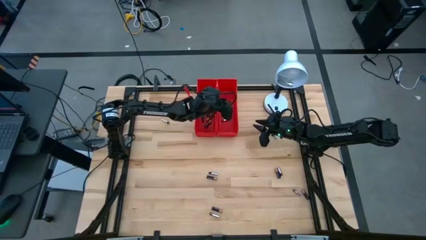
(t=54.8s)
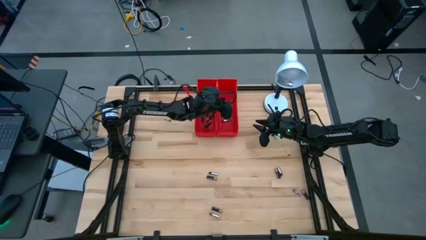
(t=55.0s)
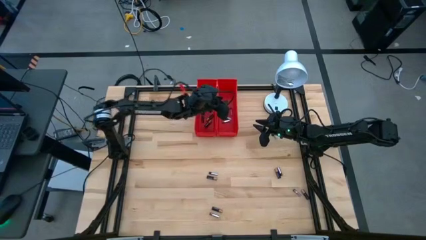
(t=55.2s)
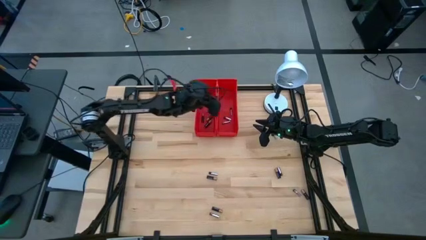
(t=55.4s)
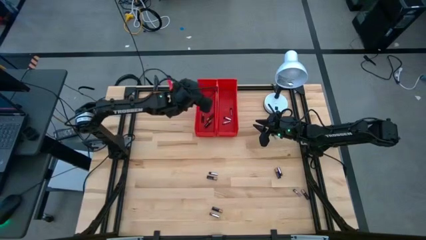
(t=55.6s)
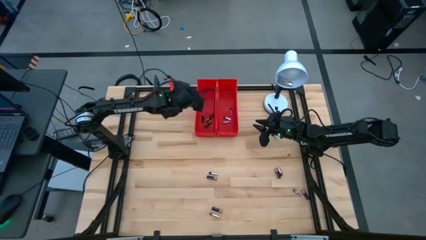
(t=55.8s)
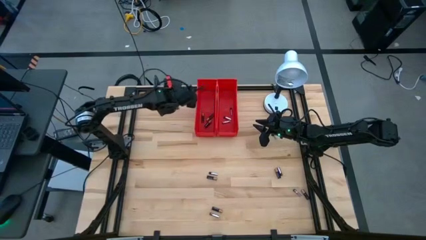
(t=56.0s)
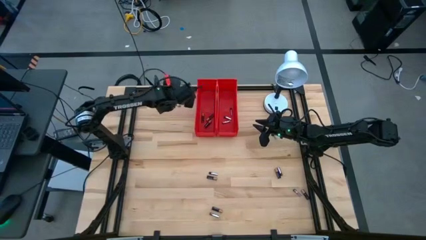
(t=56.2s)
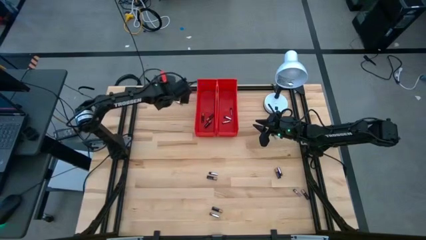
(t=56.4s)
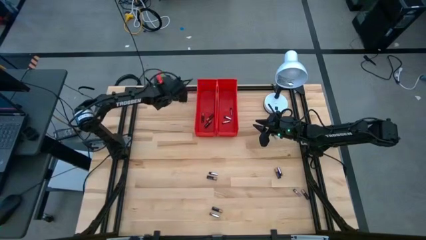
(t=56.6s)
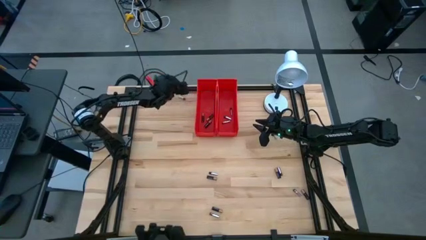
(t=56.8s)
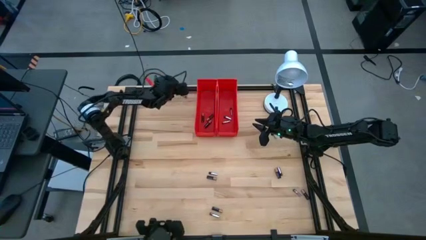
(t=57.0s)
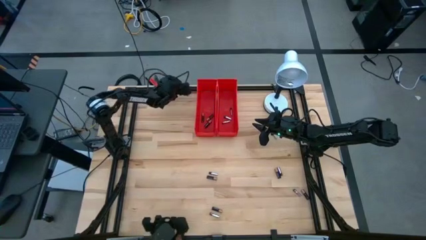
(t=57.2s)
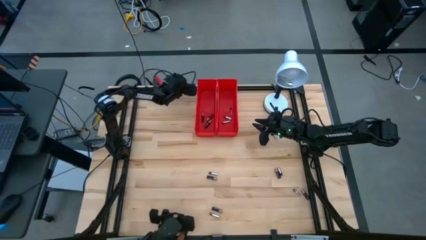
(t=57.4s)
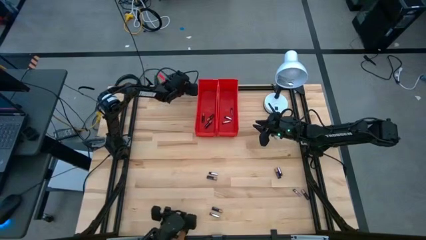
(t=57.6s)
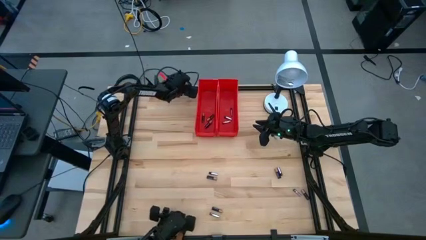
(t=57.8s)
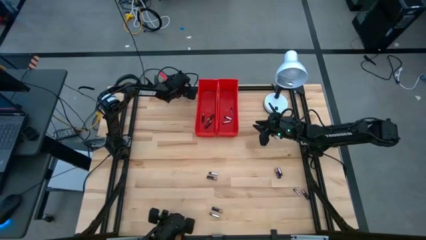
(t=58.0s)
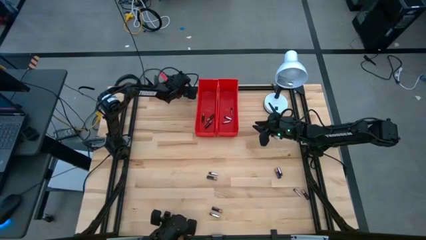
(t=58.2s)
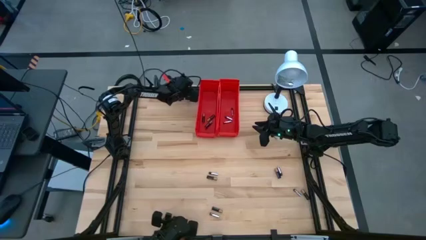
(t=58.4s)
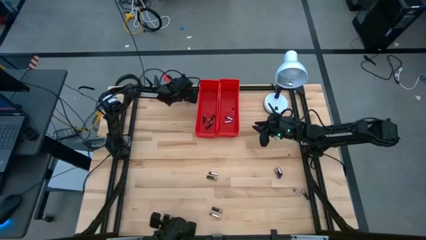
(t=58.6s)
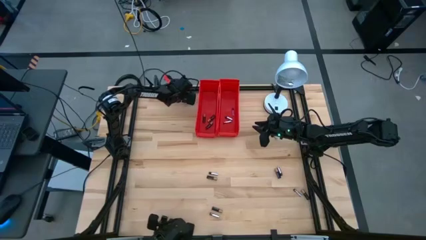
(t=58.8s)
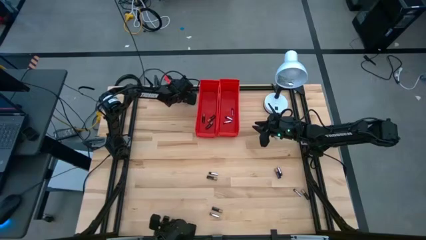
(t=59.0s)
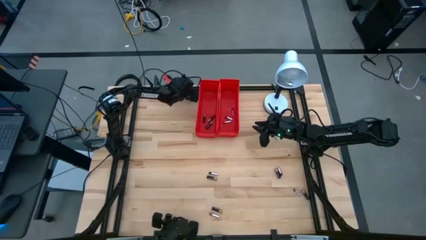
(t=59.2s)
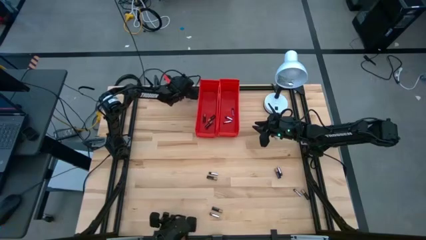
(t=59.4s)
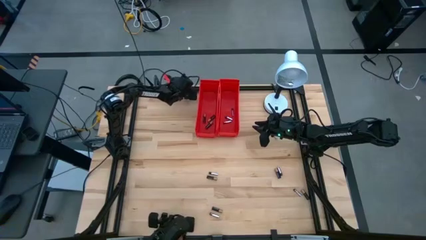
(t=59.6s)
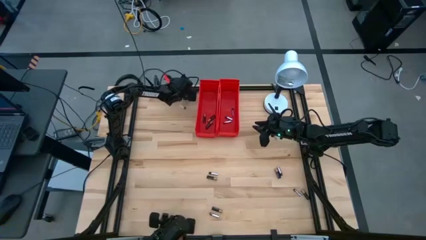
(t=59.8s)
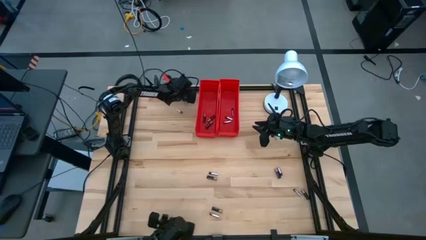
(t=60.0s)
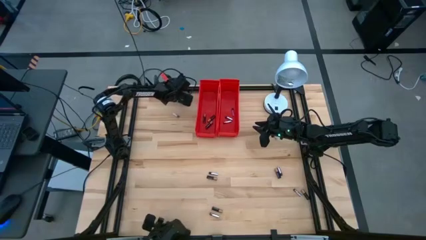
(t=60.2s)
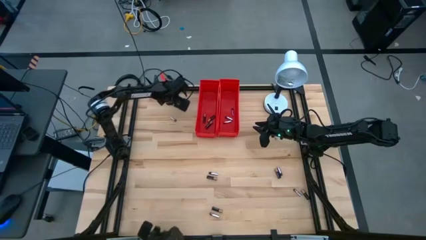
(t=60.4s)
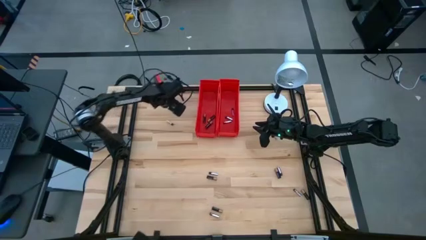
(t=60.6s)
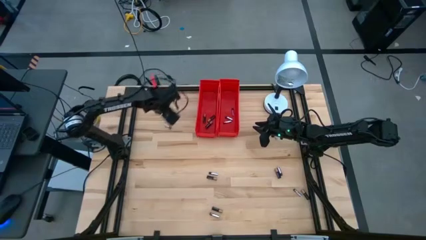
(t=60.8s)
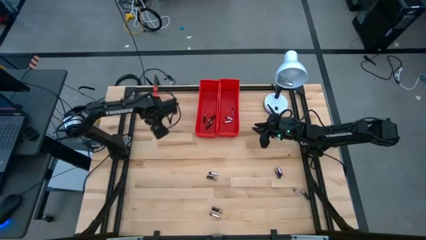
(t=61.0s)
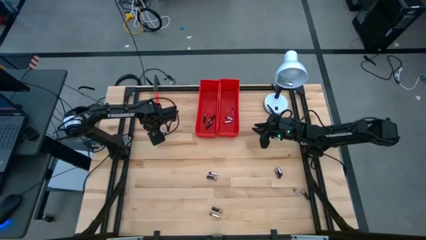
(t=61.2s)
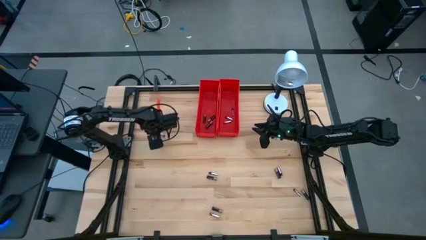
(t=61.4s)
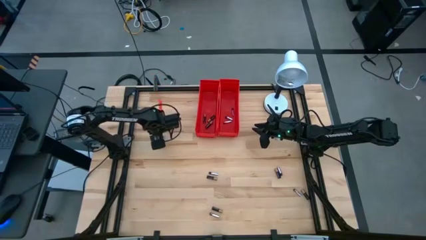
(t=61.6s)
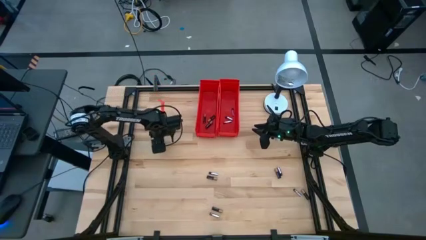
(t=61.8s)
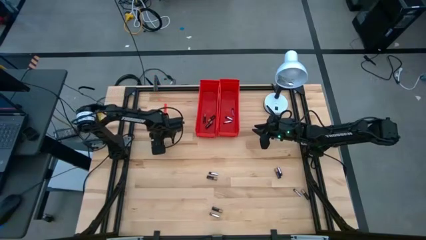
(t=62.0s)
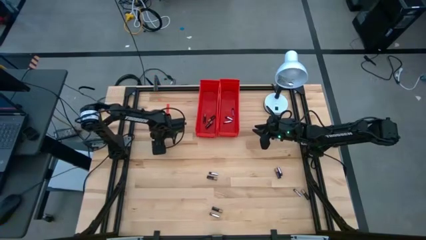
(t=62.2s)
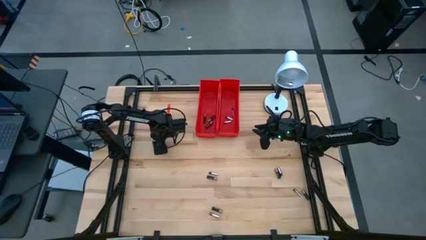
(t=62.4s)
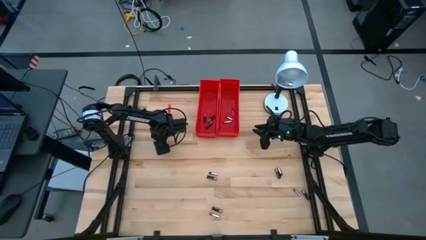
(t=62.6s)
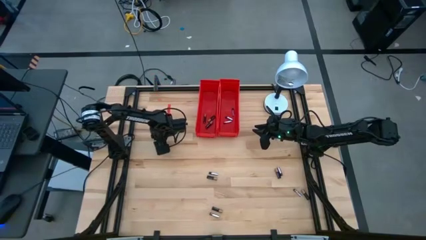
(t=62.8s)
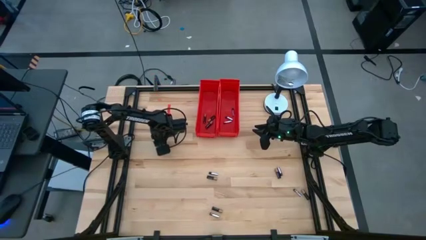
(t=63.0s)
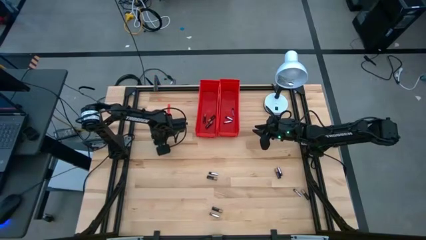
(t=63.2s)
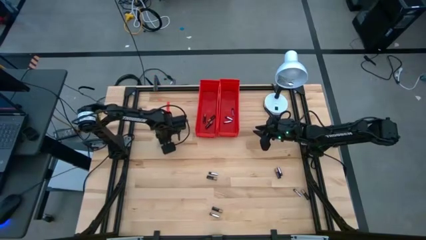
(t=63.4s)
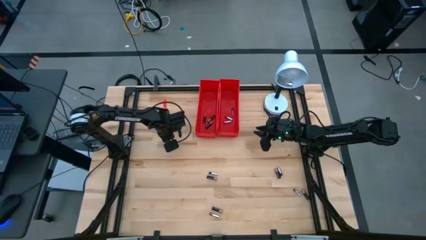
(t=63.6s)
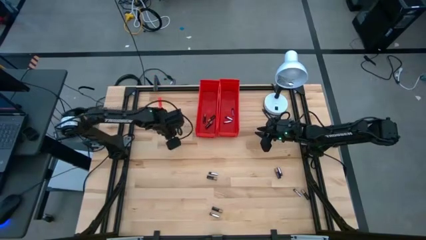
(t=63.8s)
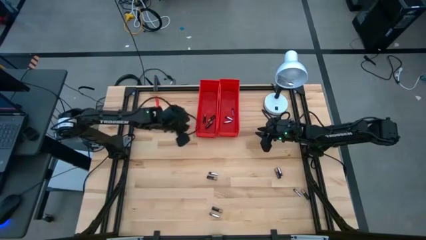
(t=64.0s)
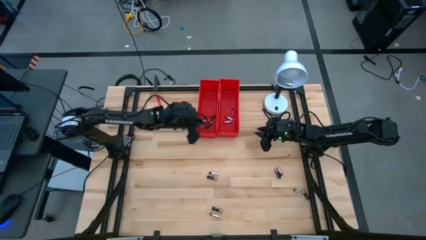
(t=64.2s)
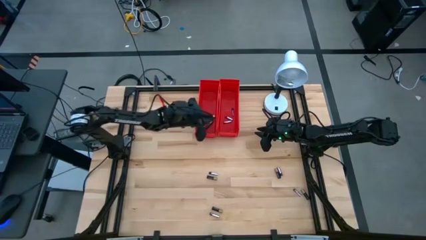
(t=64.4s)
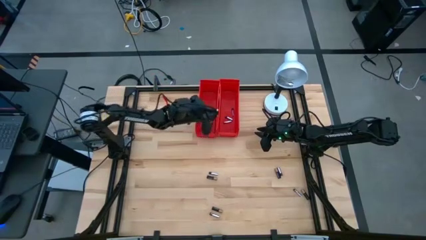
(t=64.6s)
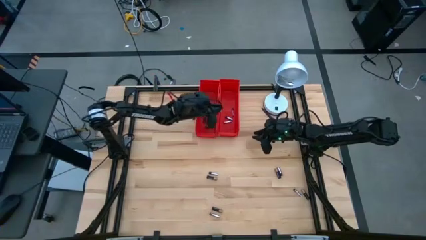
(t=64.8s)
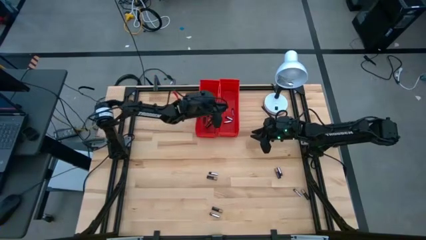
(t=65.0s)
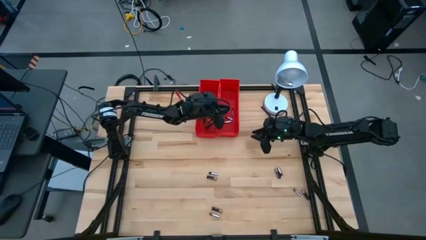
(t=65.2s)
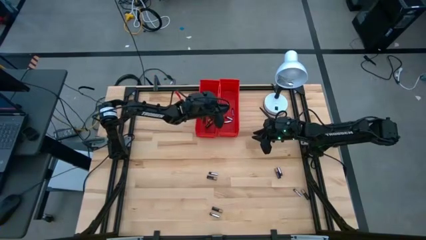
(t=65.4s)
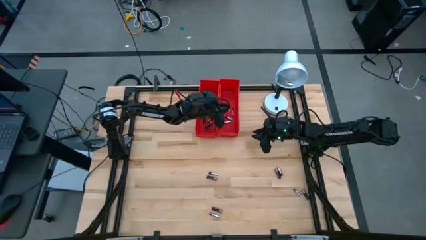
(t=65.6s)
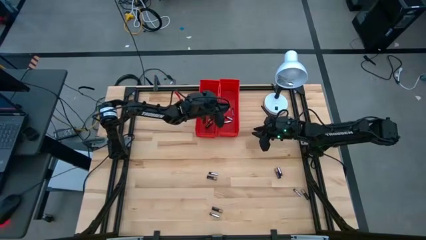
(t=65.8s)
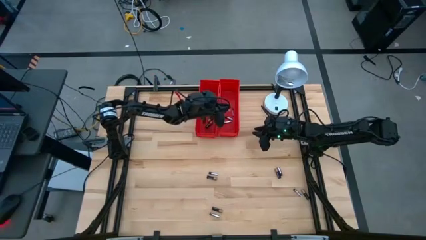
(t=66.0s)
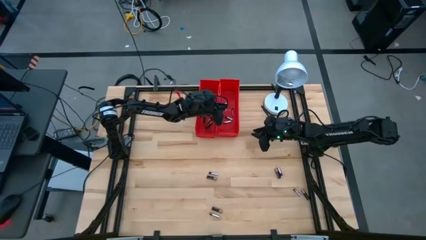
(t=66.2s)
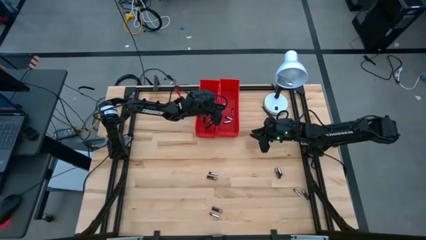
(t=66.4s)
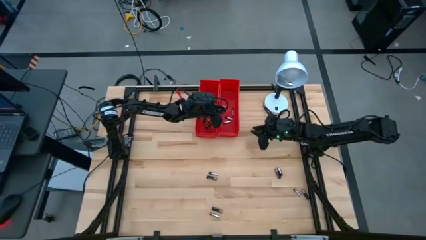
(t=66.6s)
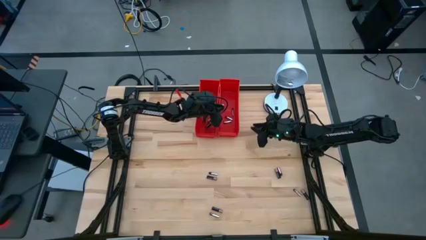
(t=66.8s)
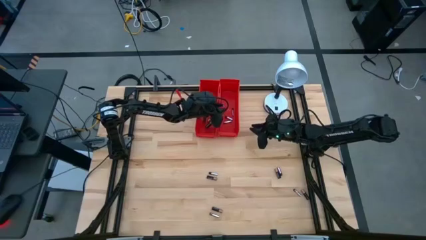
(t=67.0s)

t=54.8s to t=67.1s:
Task: Sort batteries
Put the silver battery into the right red bin

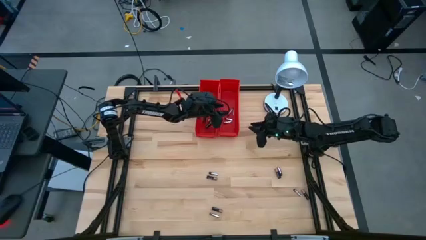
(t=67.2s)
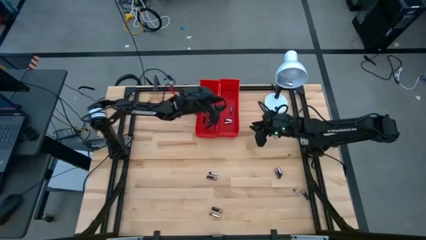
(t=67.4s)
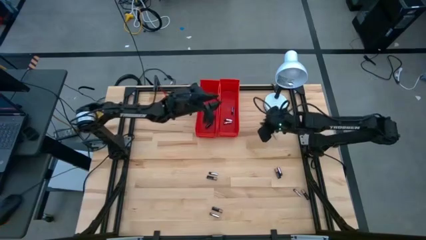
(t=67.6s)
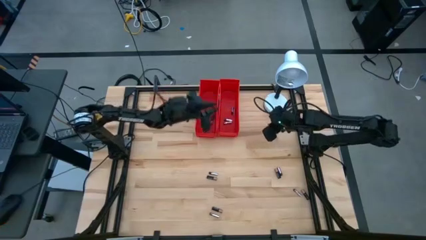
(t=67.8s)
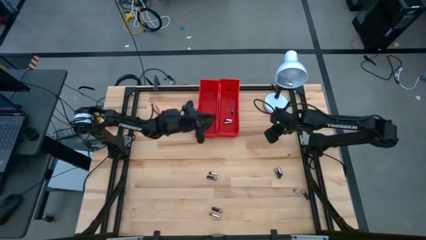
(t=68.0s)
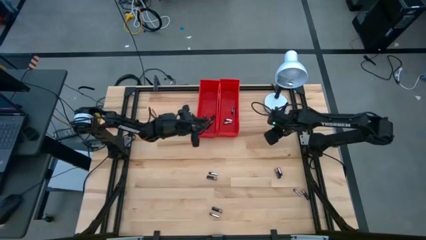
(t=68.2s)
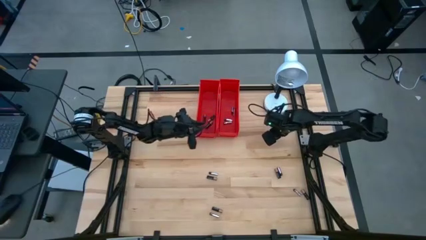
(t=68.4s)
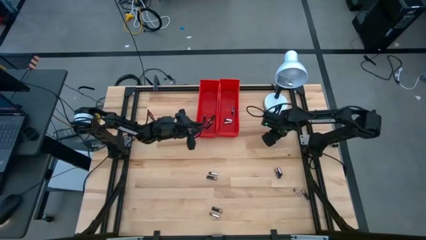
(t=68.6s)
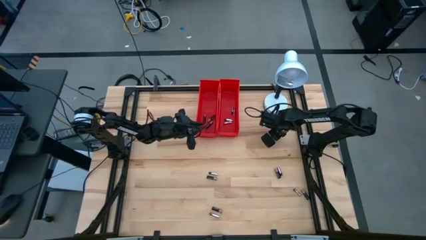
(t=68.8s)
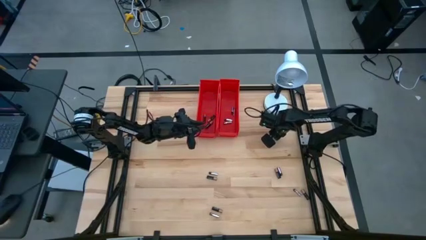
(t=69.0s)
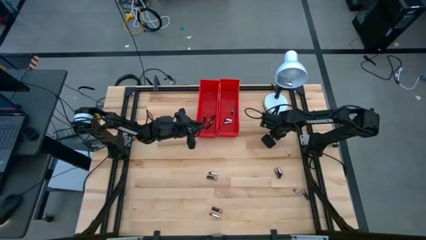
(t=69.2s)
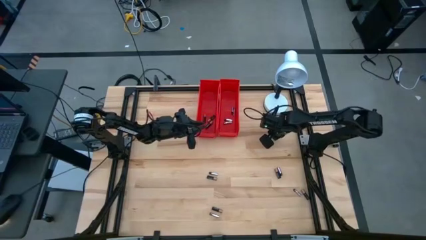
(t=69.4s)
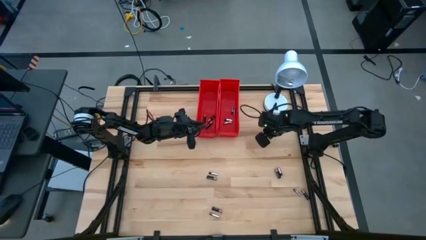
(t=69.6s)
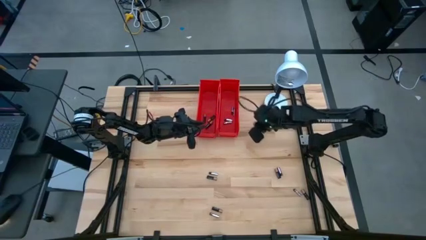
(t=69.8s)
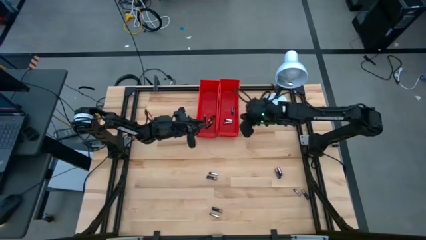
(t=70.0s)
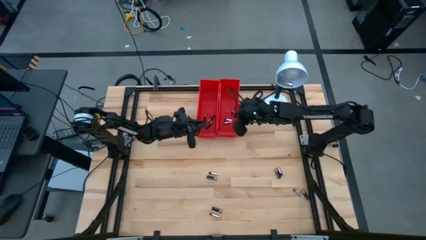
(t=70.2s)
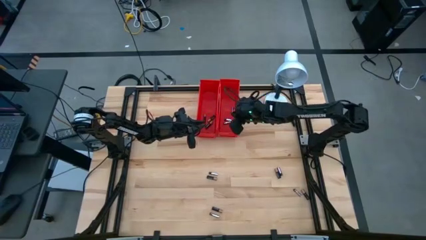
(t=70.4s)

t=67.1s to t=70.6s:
Put the silver battery into the right red bin
